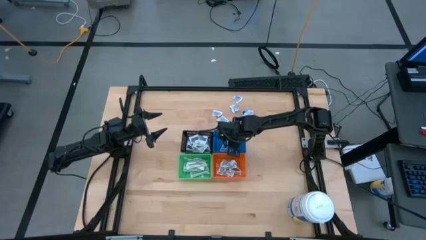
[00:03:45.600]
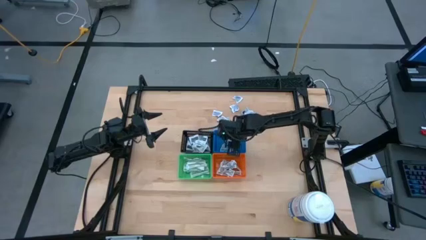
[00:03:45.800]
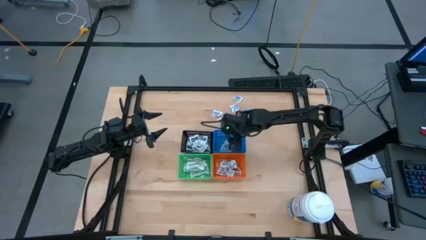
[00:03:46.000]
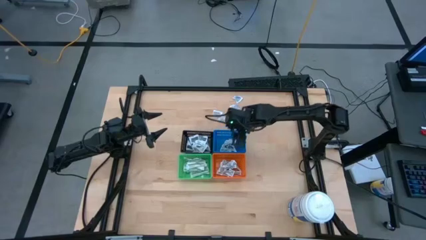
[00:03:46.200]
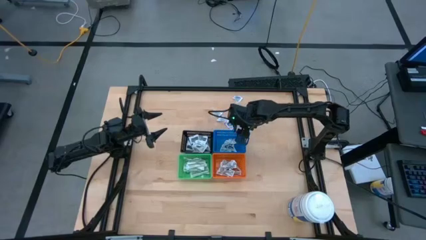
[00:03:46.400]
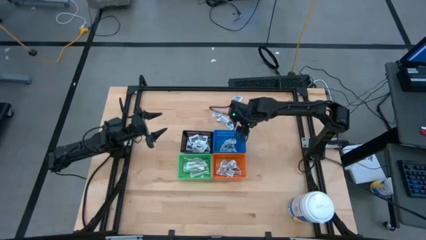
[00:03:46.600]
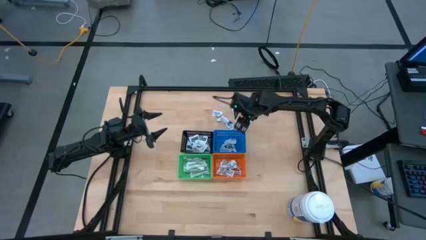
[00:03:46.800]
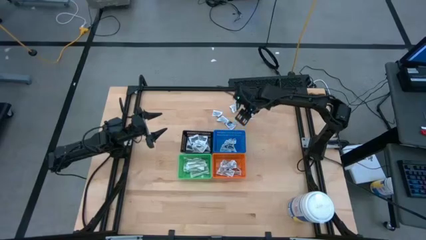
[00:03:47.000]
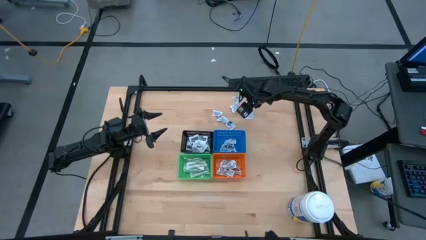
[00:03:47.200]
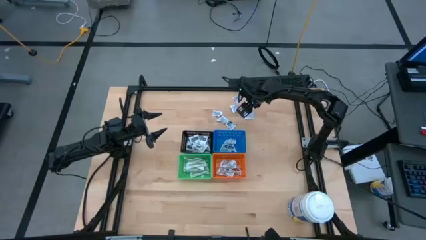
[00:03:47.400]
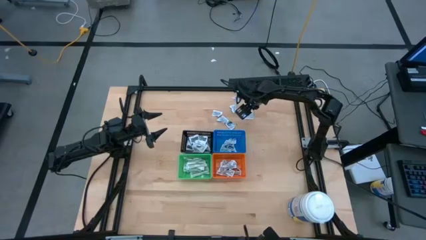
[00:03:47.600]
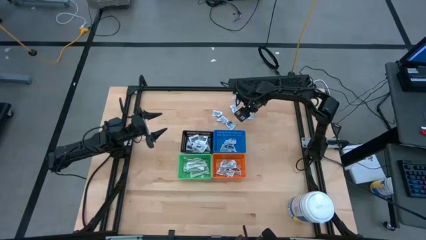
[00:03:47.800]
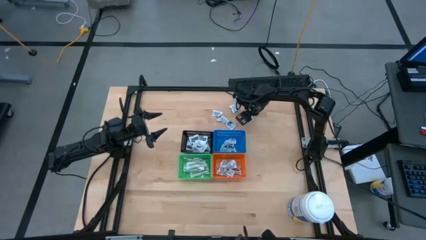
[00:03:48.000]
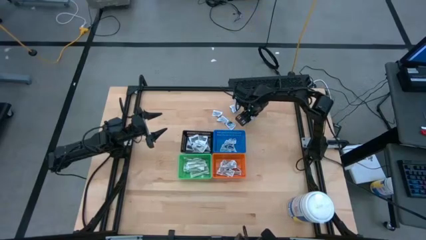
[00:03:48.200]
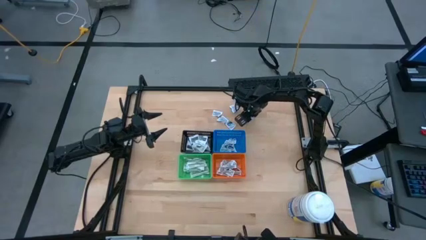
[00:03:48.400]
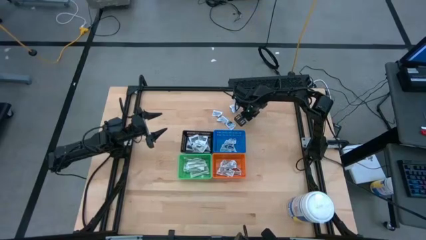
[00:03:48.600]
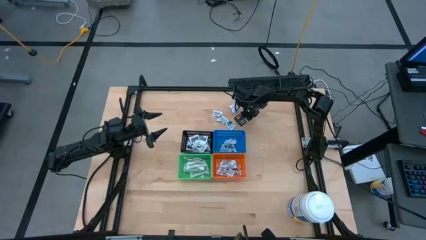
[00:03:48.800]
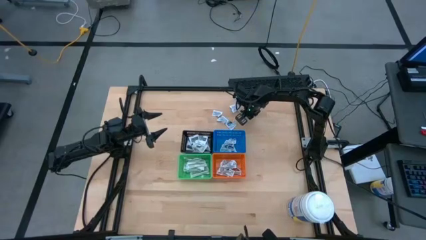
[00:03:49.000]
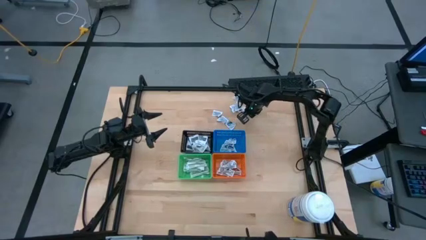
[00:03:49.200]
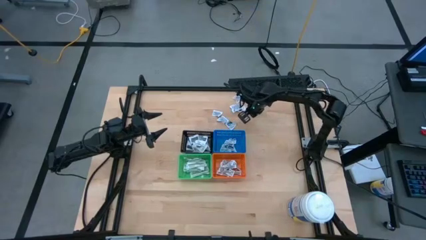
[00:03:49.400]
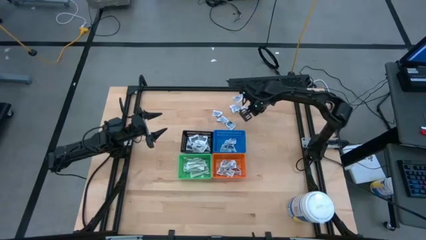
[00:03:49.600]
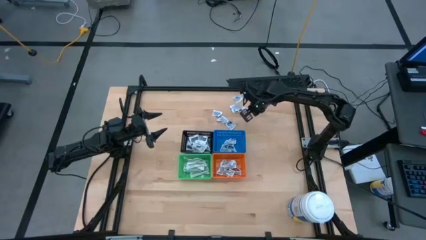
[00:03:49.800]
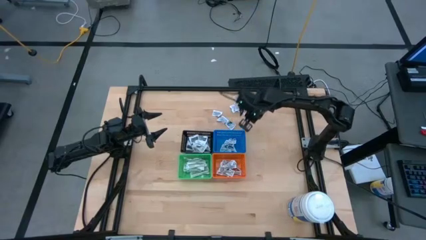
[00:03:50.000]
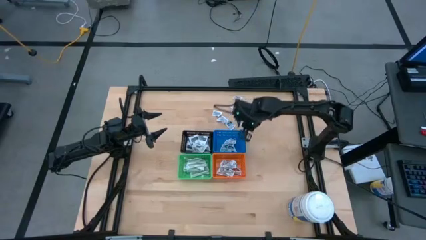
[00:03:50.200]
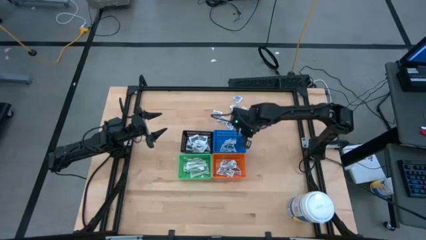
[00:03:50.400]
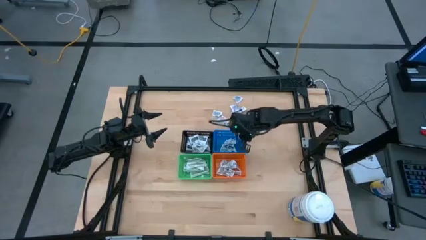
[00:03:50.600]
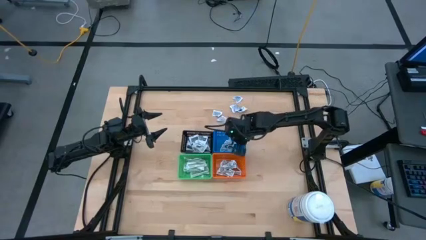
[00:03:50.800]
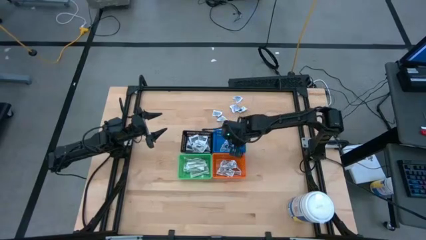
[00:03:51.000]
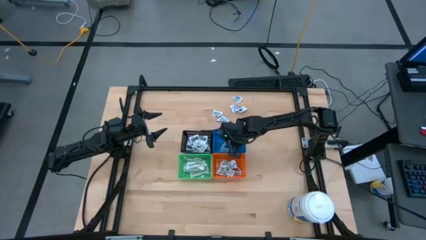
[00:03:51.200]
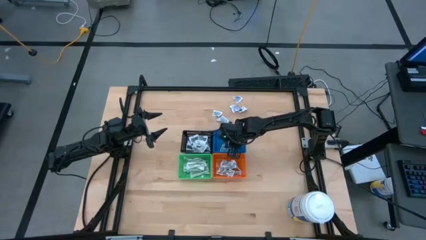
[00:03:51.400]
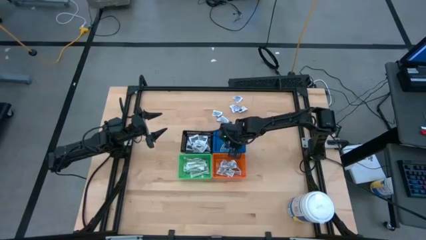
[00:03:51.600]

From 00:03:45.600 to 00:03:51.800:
Task: Pick & Place First Aid Supplies
Put the alcohol pad into the blue bin

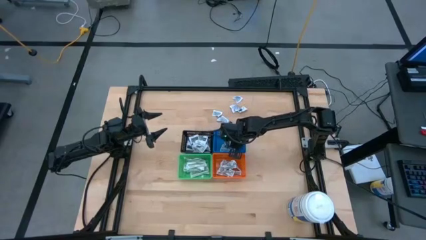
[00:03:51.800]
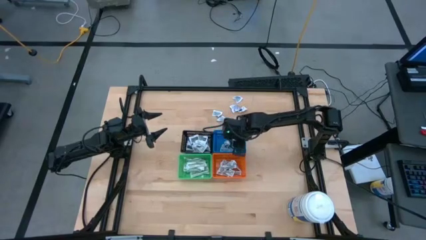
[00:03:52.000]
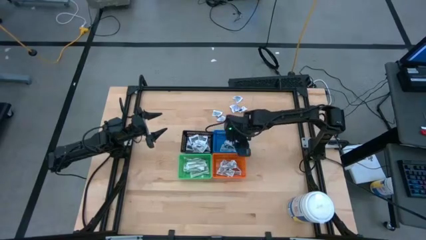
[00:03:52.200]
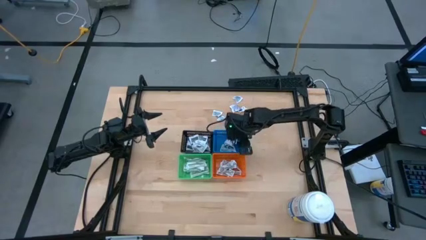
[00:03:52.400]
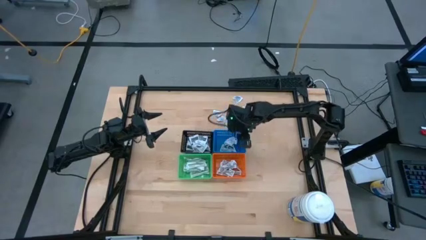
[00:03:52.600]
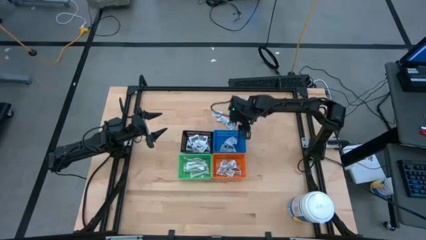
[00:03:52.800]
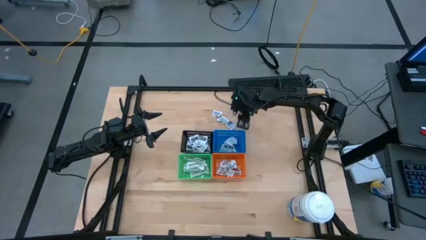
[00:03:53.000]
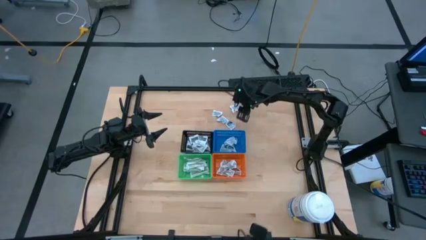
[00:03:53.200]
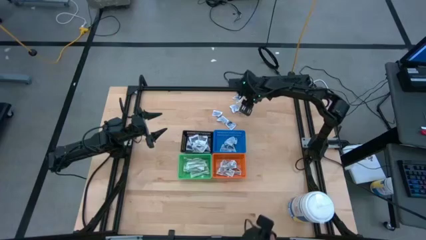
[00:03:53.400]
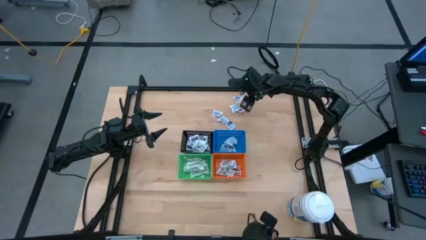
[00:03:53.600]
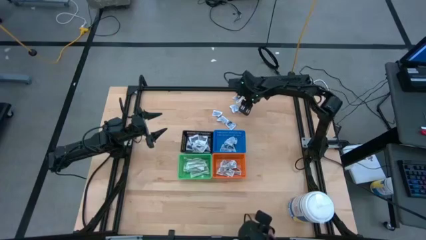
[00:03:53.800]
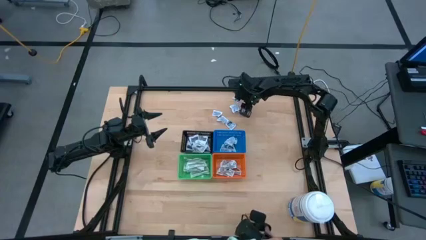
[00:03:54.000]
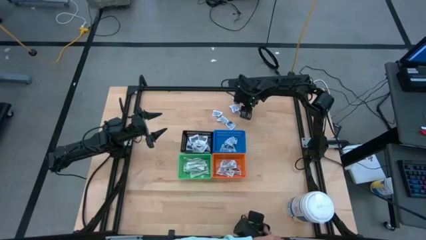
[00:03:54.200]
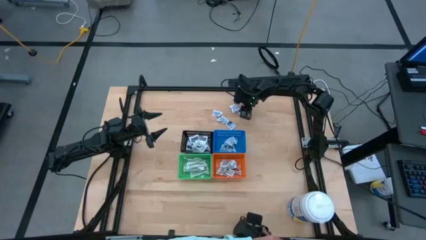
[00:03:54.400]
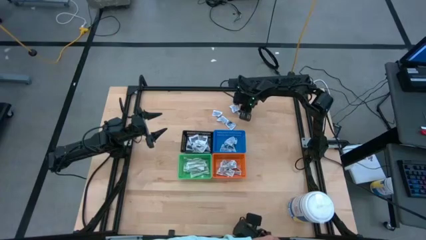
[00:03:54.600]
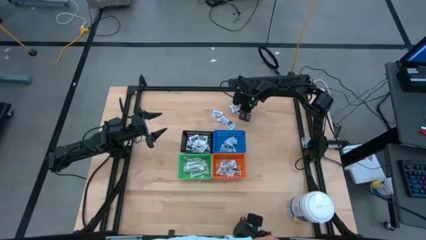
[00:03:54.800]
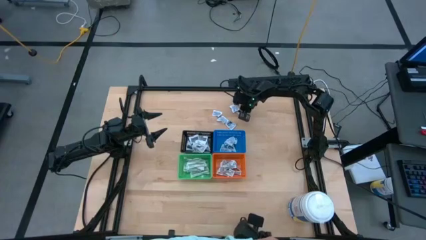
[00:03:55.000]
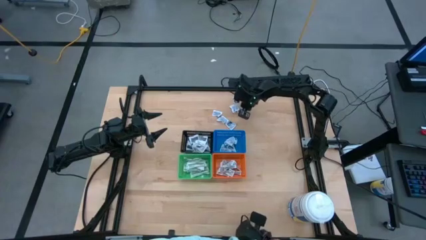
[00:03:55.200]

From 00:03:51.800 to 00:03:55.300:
Put the alcohol pad into the blue bin

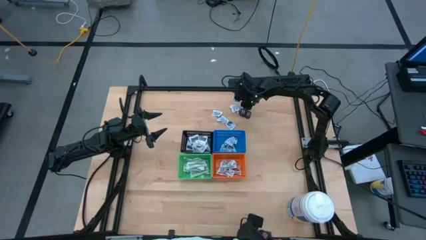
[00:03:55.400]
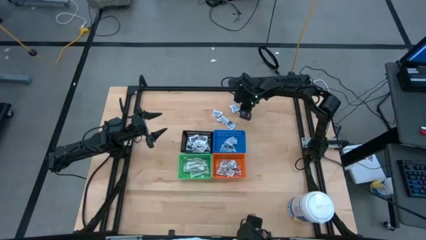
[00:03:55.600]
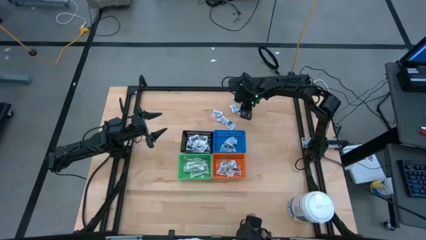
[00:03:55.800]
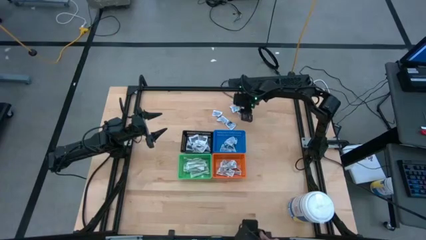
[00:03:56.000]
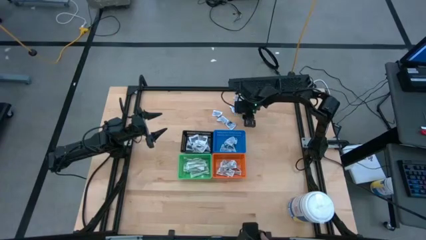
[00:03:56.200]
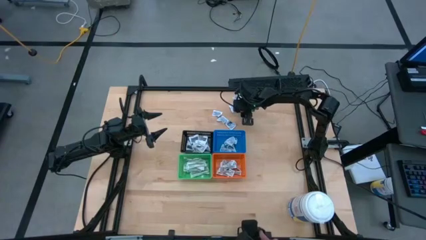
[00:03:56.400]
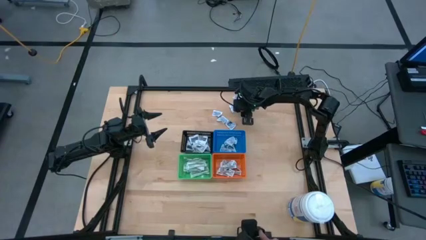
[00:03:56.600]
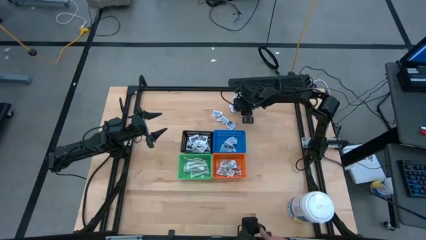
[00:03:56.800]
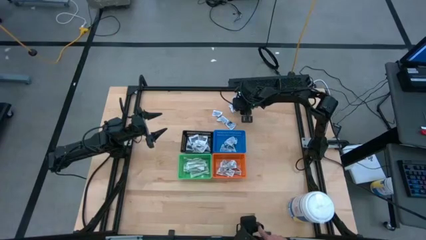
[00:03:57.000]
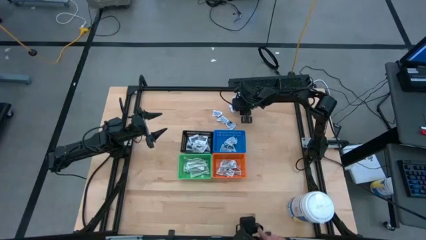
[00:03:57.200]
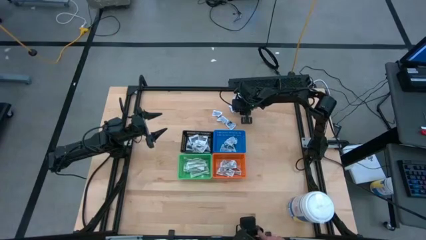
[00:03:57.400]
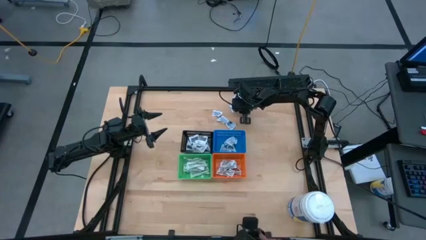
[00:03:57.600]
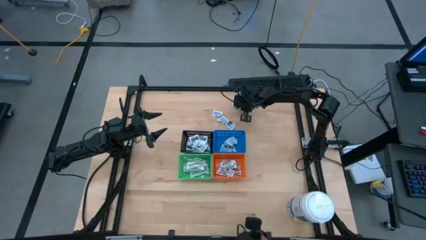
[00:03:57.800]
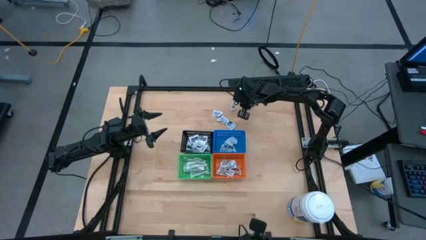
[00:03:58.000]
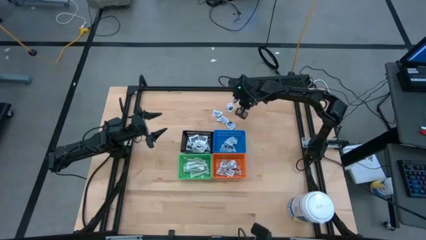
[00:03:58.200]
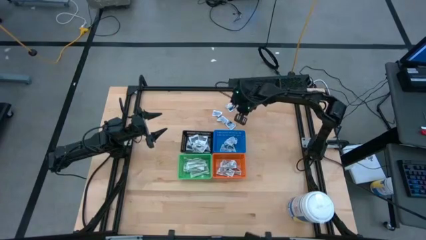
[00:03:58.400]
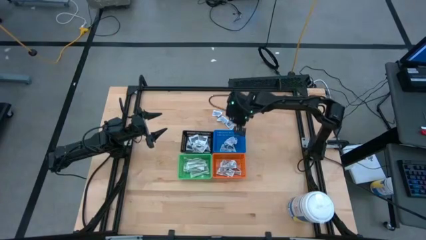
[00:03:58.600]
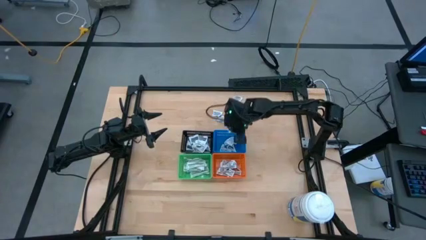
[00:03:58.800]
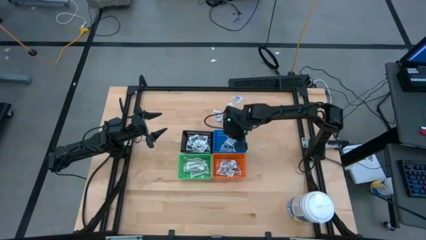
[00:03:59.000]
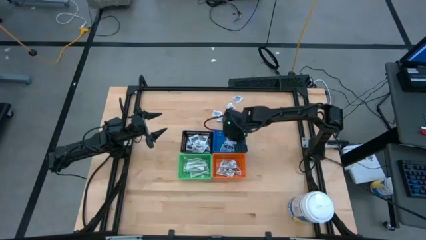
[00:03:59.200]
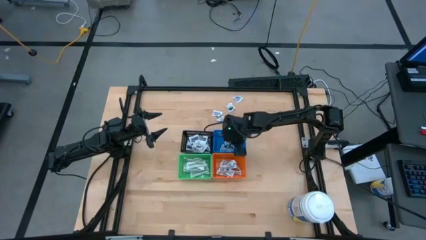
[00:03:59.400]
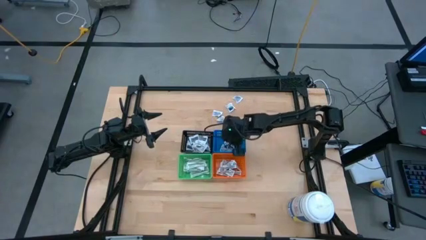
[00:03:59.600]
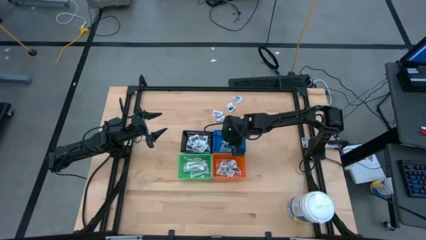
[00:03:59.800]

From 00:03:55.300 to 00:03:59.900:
Put the alcohol pad into the blue bin

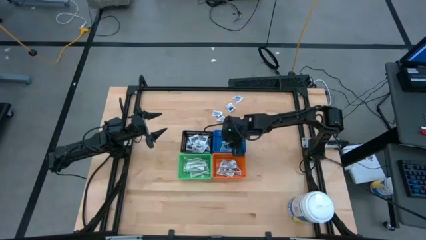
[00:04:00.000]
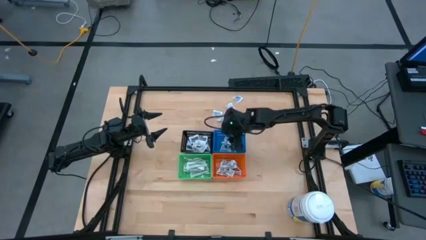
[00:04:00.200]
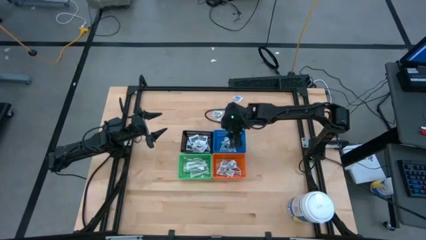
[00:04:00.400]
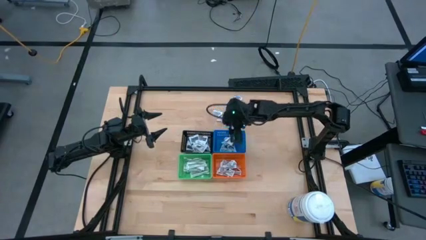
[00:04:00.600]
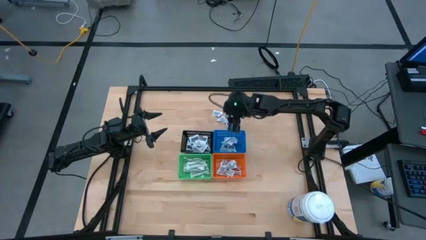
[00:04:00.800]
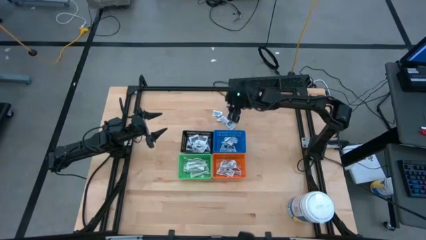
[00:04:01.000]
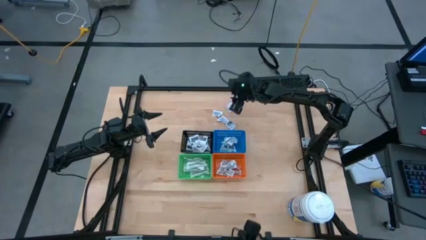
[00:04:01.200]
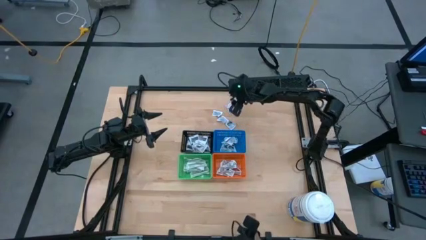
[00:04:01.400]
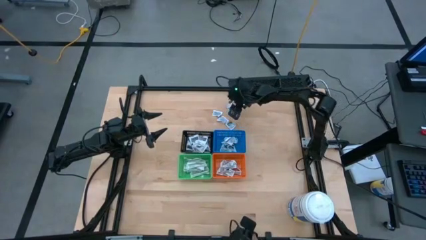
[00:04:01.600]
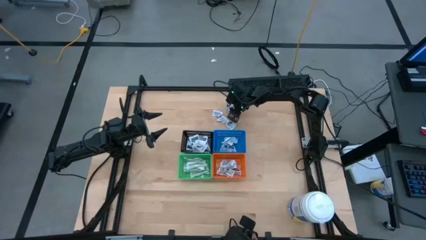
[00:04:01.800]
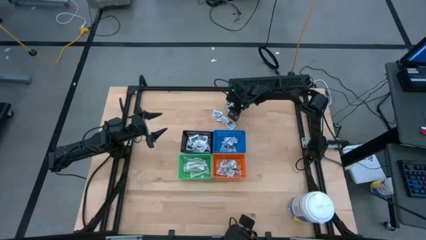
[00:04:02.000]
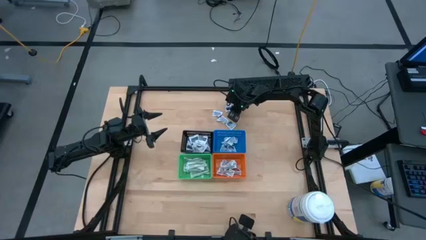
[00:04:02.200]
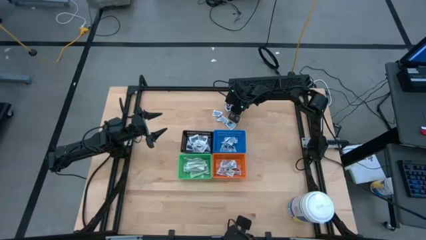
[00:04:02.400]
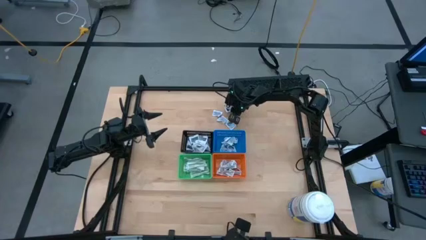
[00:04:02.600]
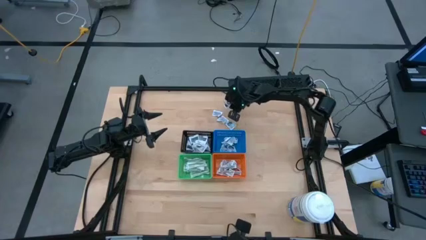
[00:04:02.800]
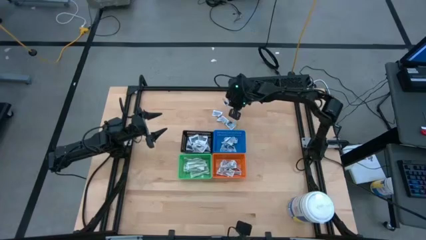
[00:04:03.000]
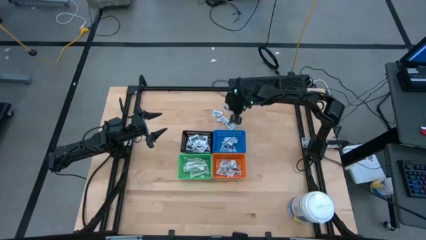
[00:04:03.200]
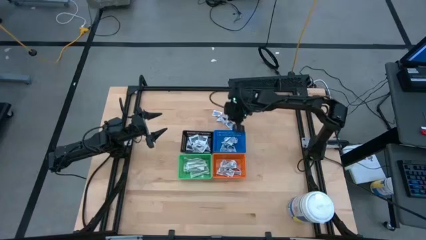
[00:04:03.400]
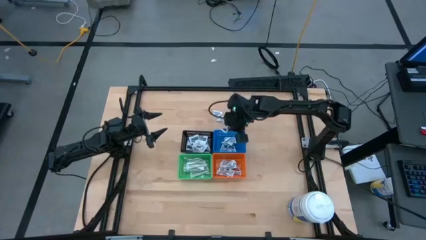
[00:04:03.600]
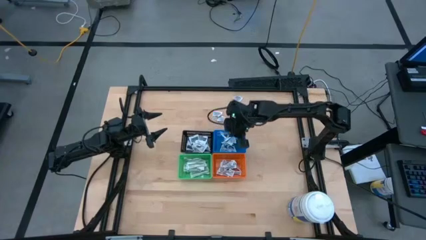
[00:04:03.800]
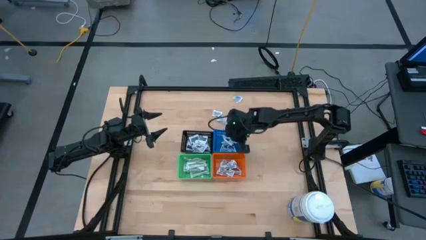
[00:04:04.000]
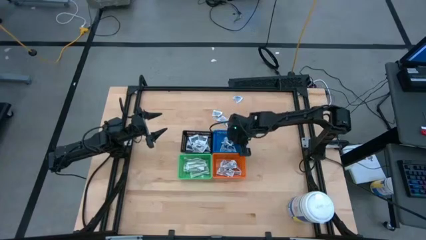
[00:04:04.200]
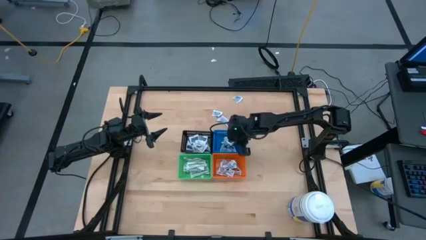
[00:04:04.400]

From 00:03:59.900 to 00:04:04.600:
Put the alcohol pad into the blue bin
